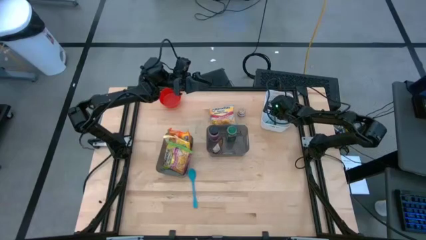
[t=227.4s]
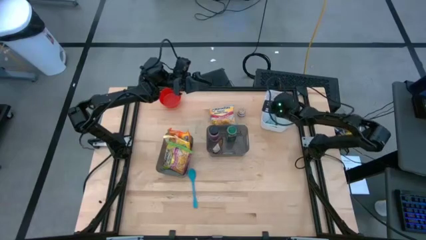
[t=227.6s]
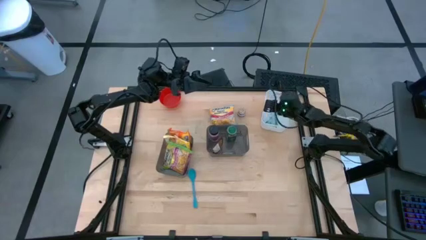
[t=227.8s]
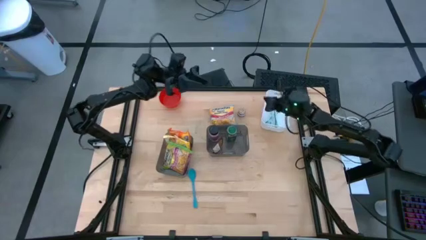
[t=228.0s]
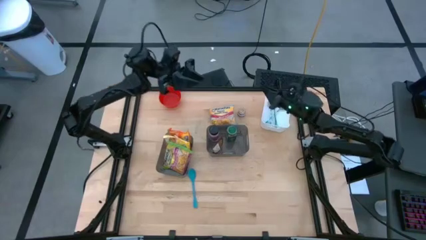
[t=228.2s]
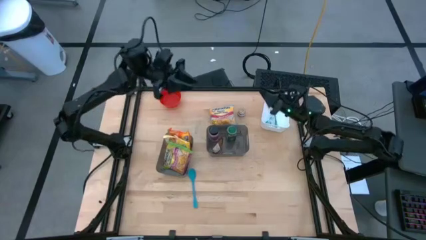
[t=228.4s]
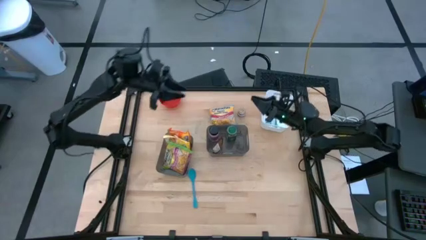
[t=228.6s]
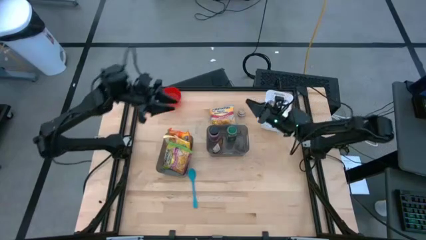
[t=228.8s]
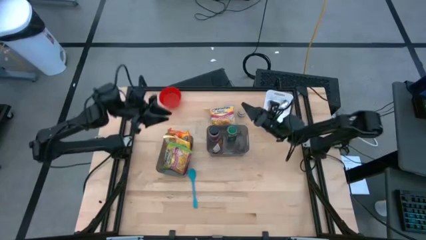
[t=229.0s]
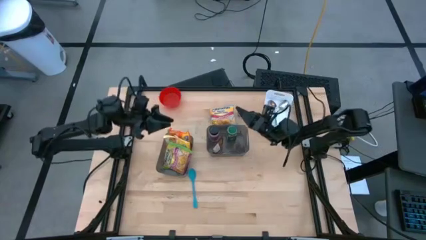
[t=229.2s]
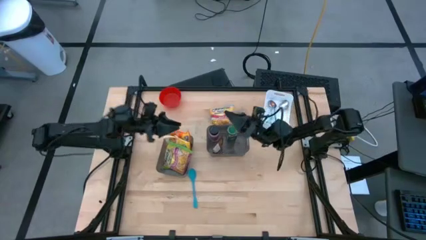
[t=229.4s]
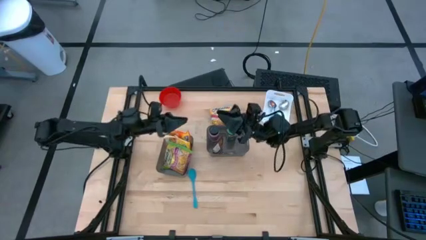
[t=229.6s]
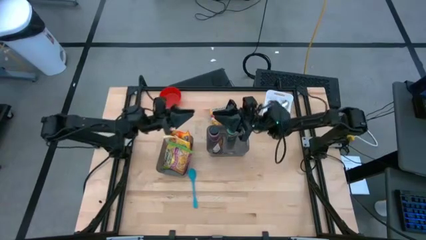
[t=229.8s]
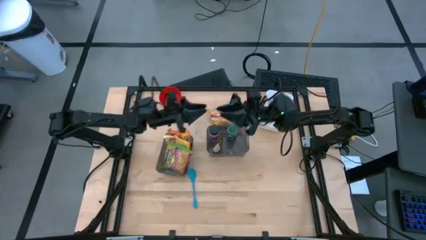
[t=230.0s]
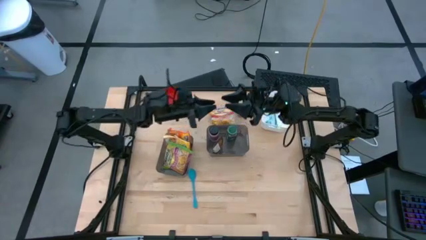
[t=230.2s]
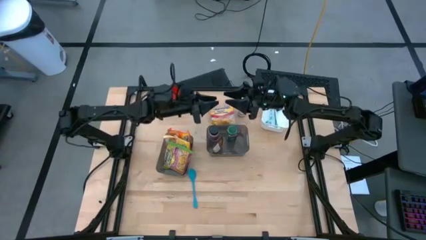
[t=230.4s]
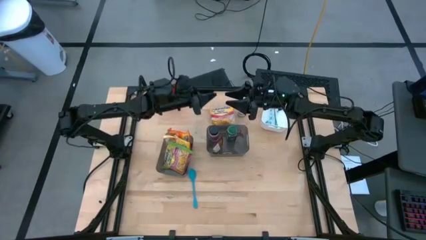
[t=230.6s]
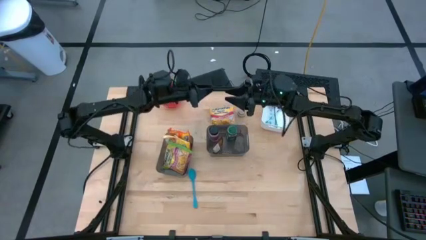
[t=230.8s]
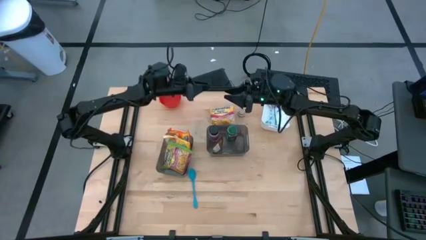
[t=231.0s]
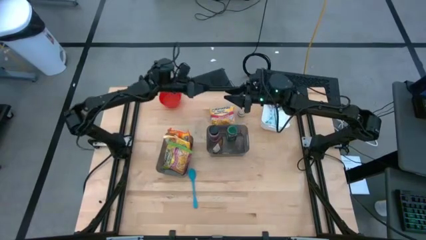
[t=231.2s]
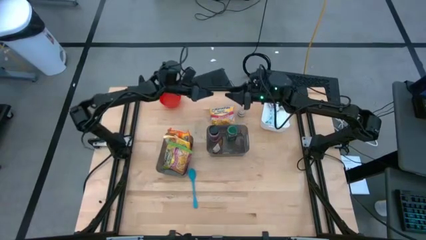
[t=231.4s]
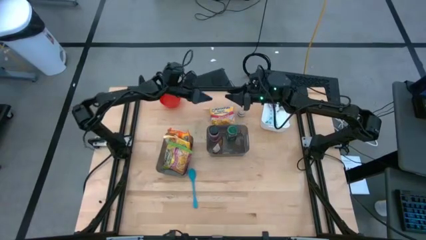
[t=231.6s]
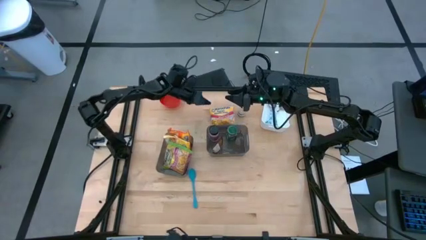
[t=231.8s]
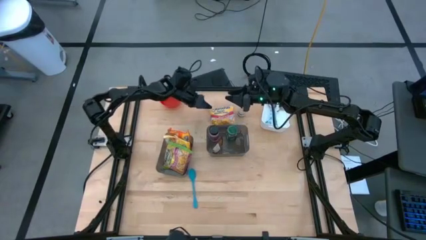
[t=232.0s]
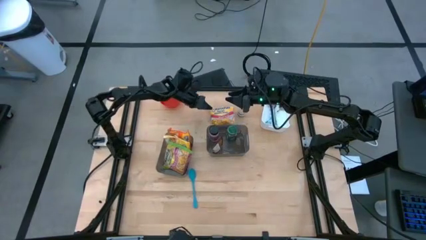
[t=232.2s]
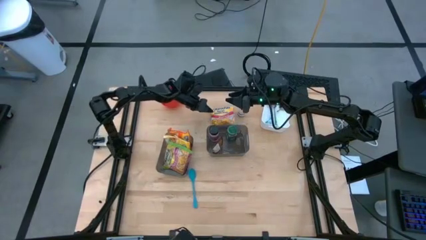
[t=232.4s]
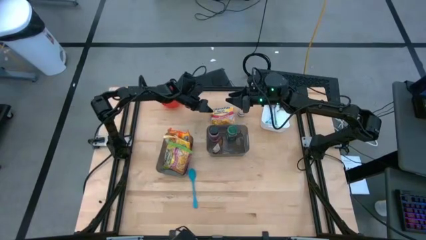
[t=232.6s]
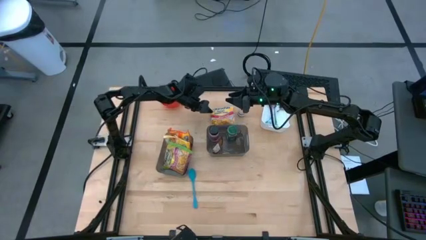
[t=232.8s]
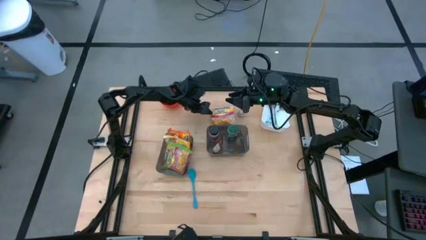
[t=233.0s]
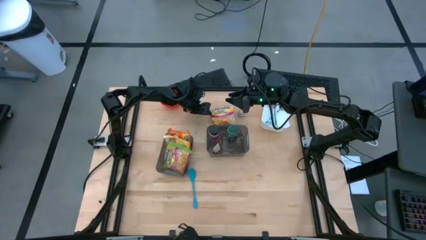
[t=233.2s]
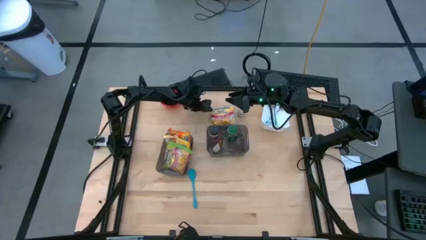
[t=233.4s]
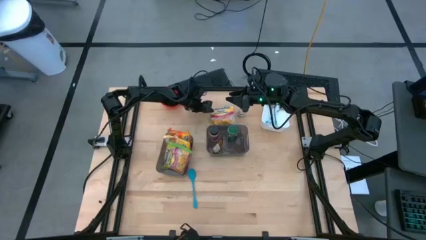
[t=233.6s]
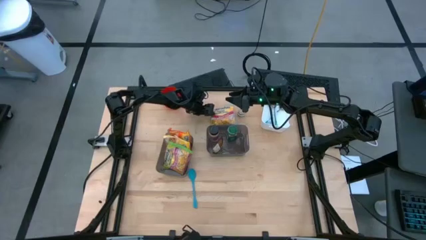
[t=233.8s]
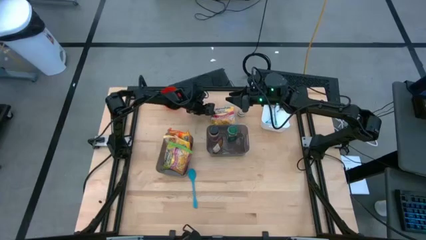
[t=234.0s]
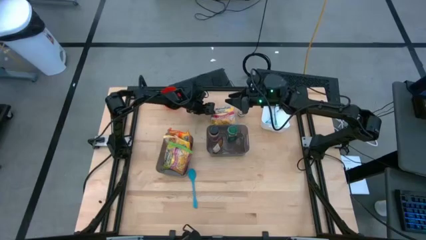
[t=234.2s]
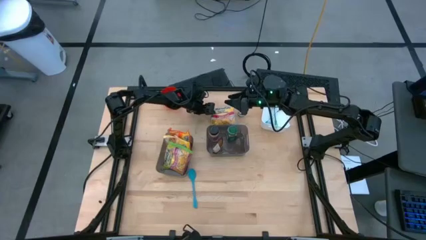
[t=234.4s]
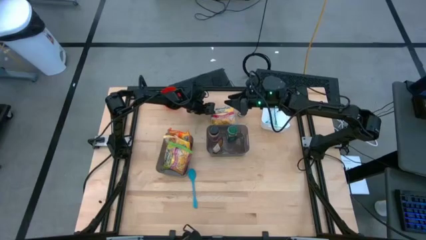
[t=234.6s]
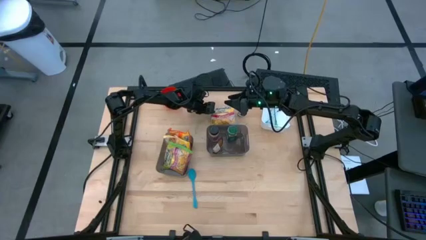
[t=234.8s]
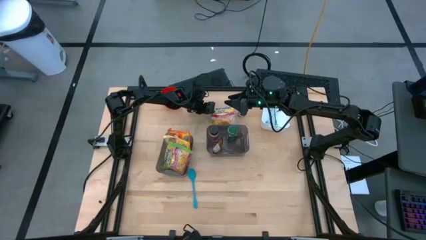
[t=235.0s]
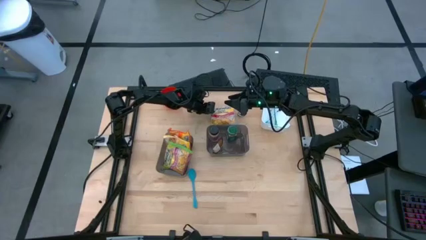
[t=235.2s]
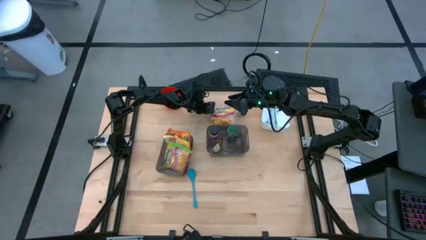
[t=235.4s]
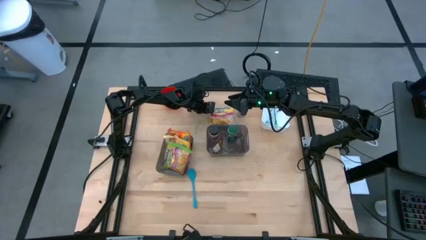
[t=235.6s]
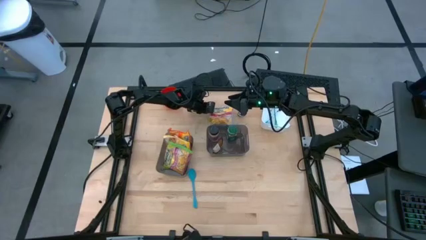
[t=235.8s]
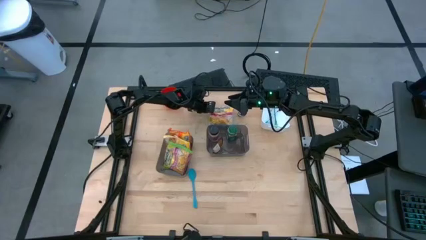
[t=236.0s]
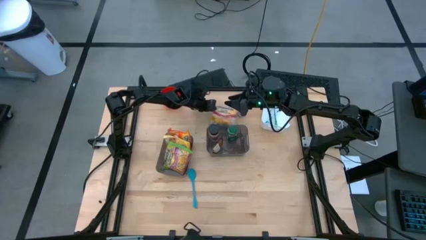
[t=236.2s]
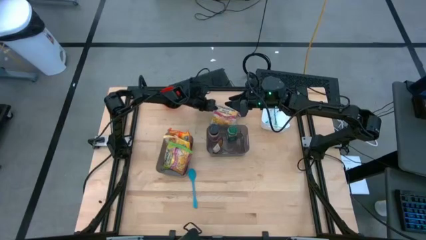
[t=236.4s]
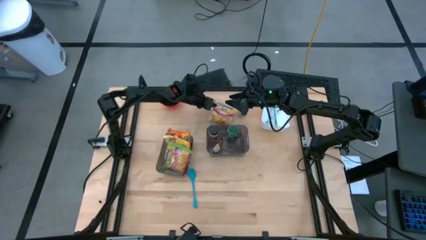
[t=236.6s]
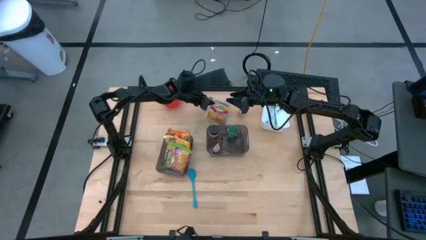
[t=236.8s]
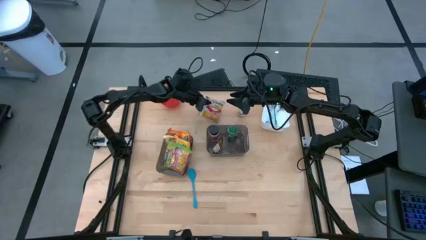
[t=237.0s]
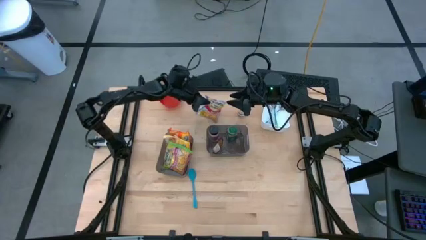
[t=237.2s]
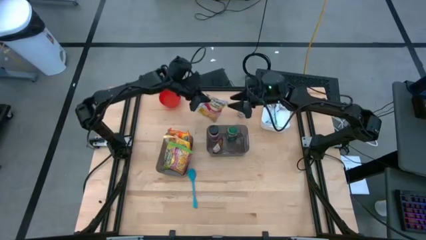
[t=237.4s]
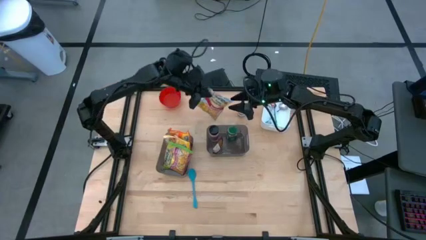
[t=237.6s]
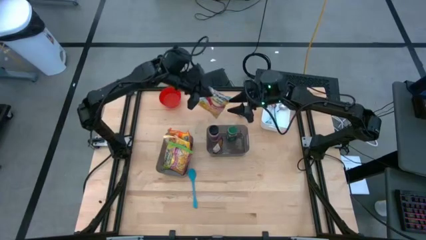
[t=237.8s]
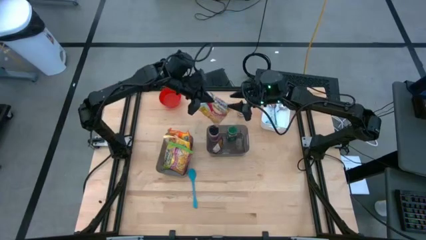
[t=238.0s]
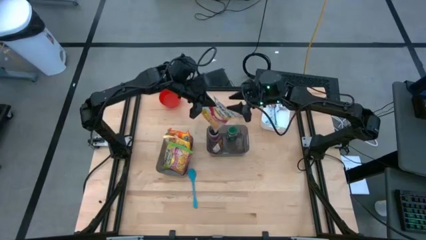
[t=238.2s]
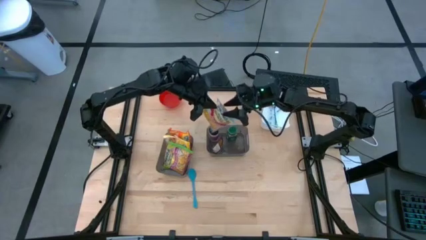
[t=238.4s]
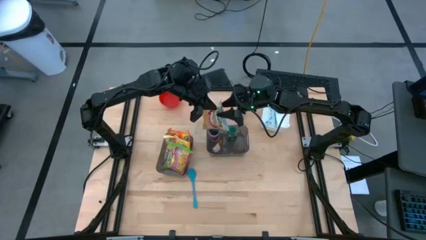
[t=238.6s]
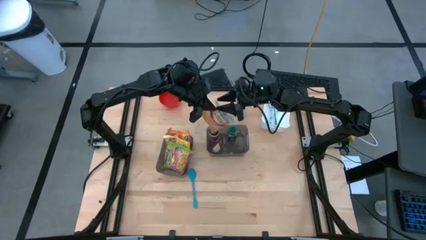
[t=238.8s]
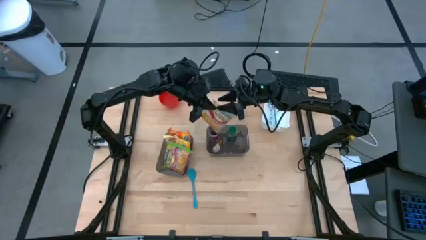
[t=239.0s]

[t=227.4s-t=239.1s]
Task: Pick & Place Food Item
Put the blue noodle pack into the left black bin
